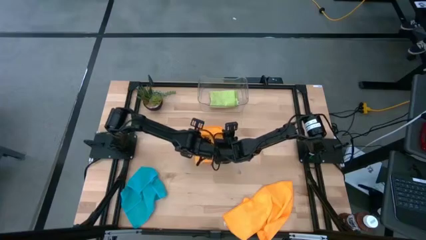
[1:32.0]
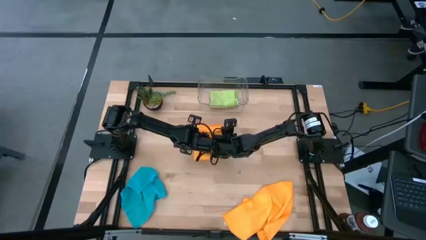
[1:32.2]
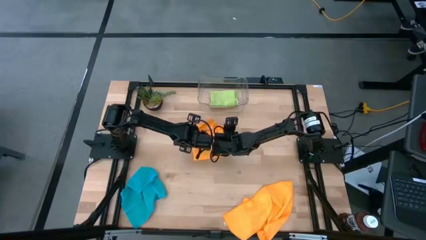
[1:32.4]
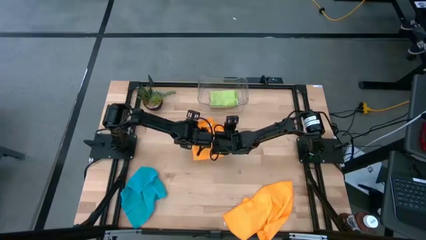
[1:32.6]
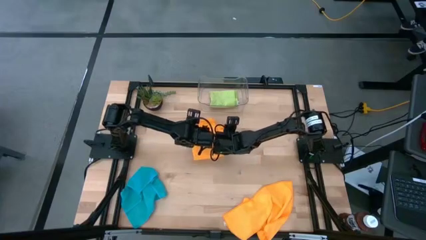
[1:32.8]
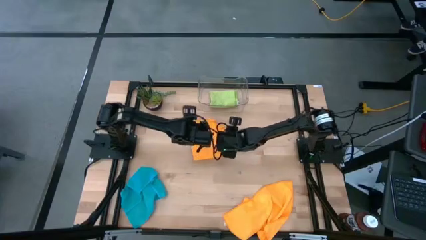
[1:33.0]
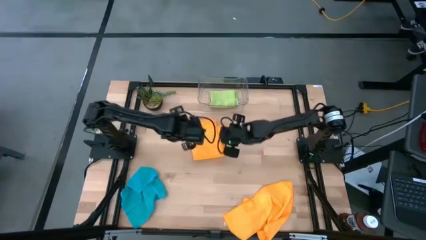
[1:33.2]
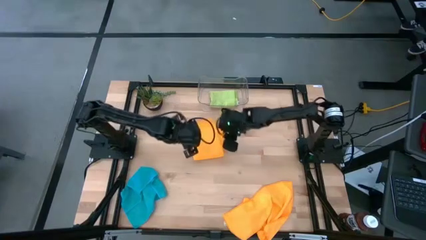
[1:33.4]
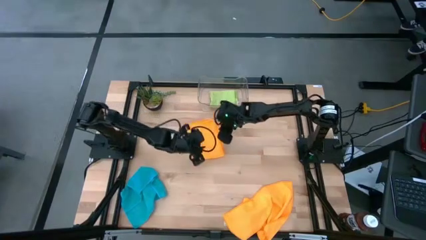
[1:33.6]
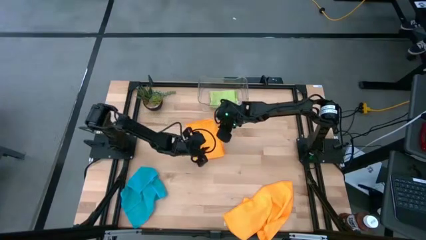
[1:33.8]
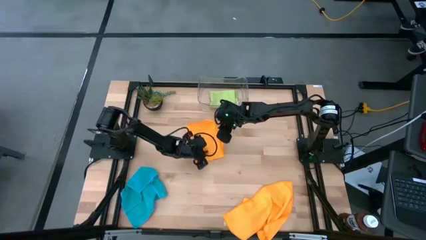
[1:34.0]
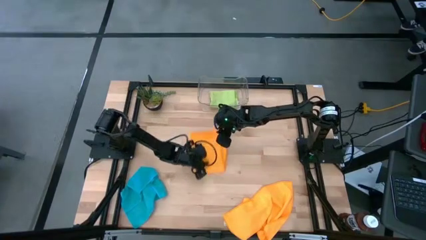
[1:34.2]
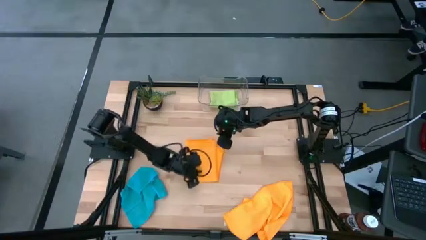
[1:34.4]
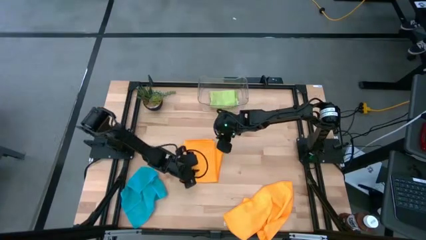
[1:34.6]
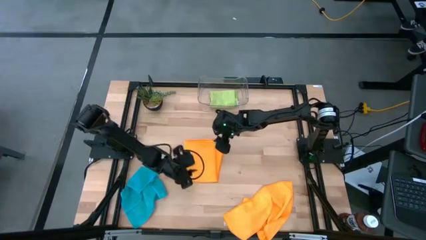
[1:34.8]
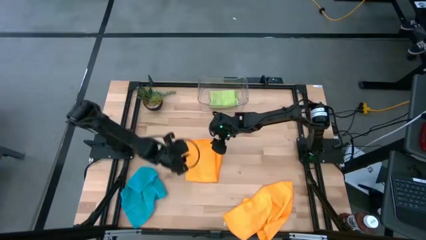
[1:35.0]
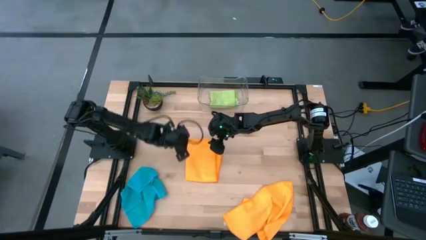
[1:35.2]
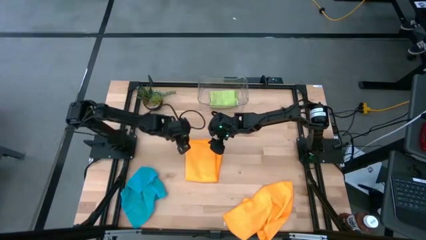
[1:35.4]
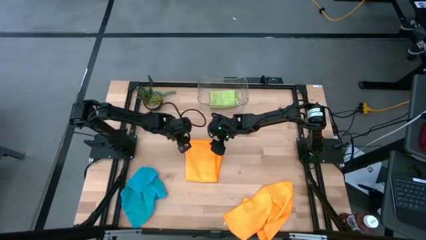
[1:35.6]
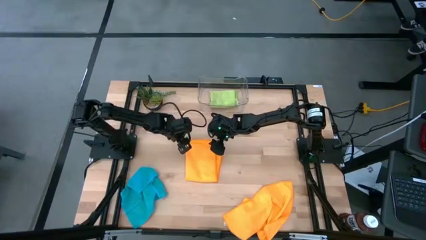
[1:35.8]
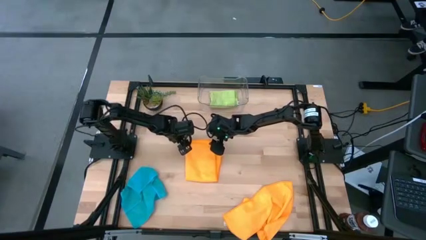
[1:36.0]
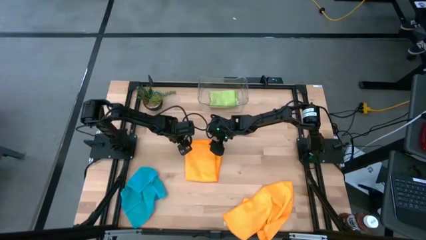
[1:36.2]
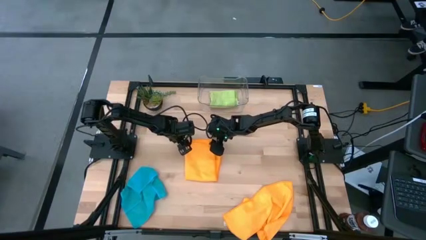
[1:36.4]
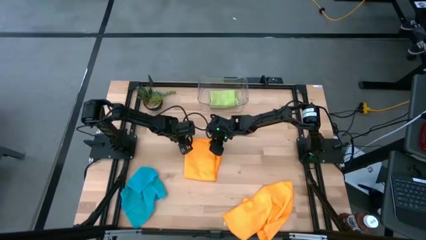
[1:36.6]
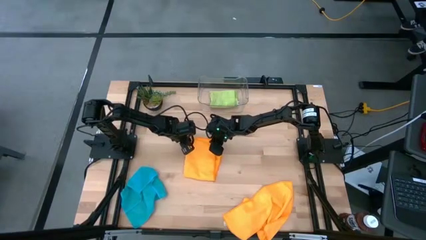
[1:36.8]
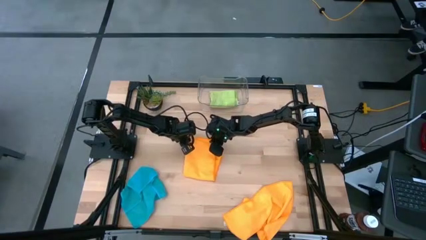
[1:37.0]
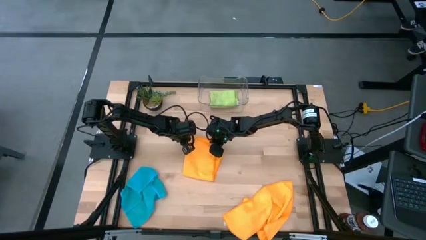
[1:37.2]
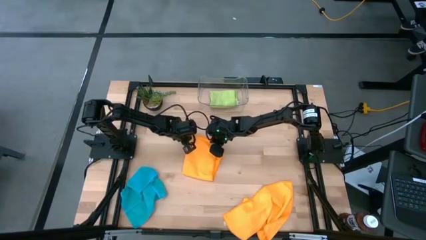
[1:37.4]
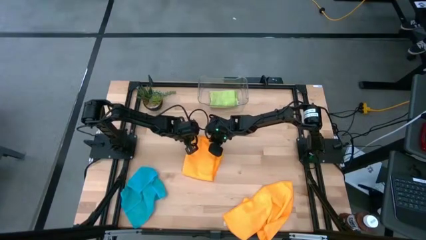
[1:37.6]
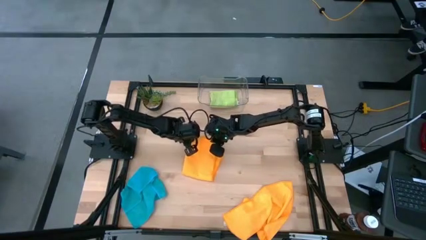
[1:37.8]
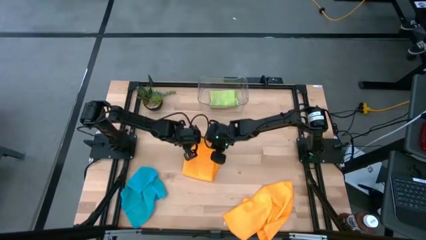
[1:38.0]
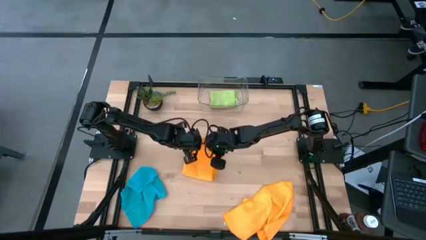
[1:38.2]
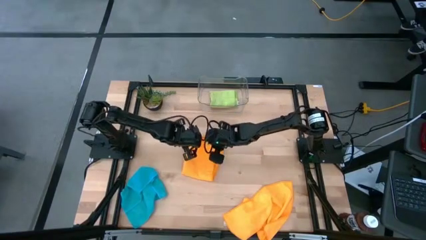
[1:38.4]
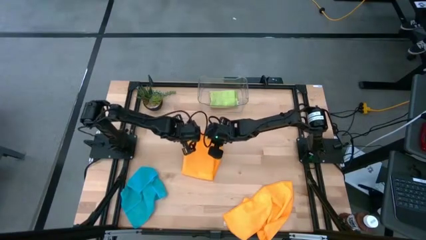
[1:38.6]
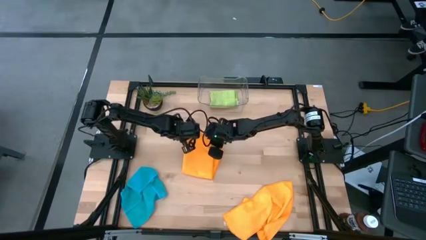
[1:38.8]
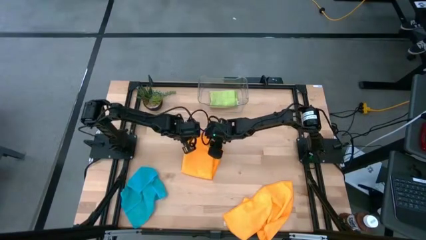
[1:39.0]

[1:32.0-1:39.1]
Task: Fold microfiber towels
Fold the top orange microfiber cloth

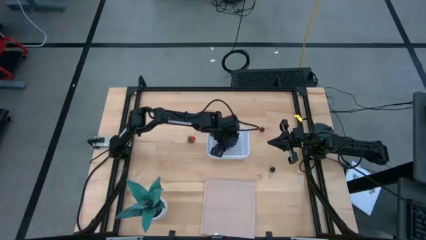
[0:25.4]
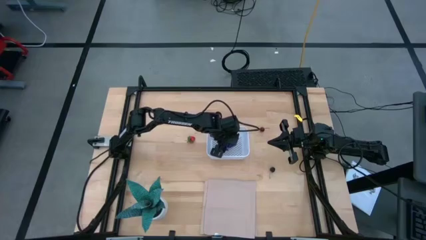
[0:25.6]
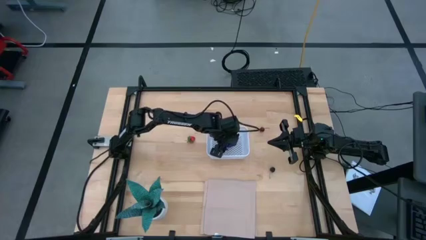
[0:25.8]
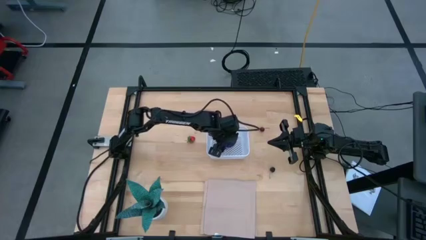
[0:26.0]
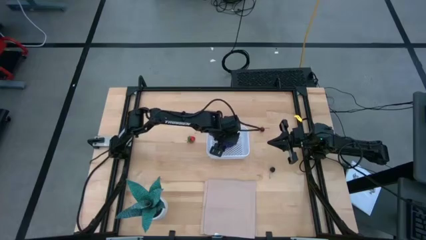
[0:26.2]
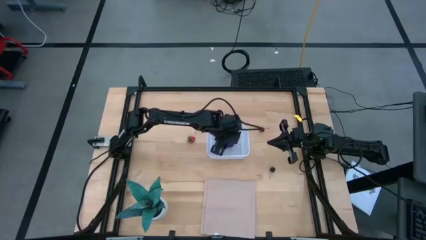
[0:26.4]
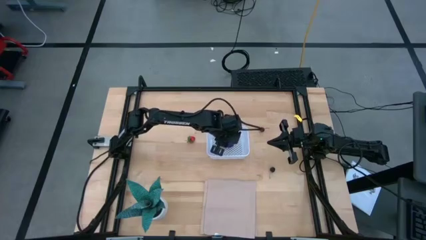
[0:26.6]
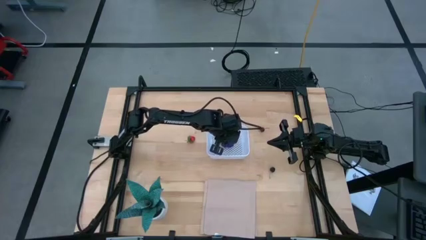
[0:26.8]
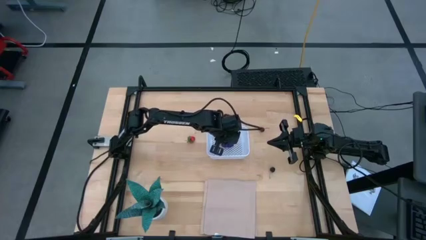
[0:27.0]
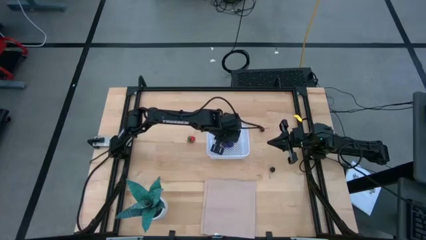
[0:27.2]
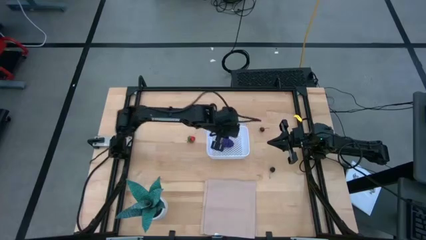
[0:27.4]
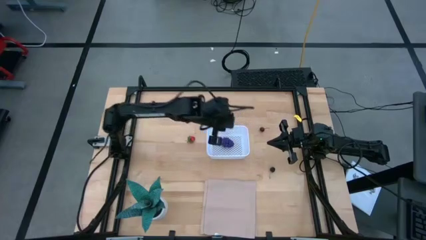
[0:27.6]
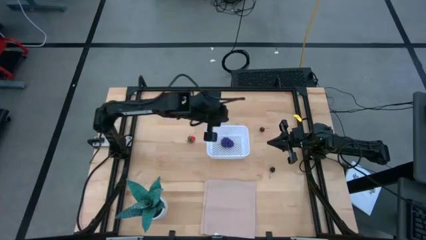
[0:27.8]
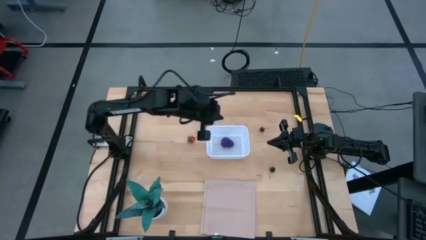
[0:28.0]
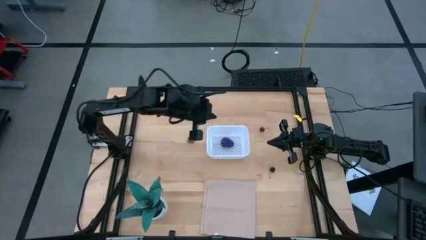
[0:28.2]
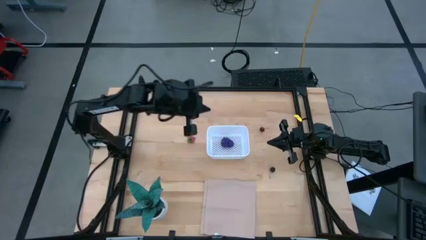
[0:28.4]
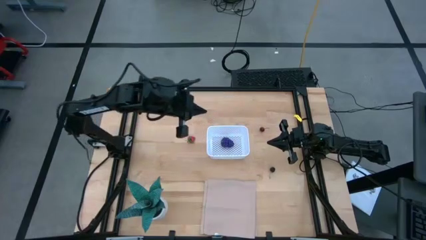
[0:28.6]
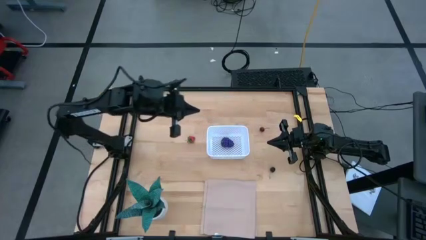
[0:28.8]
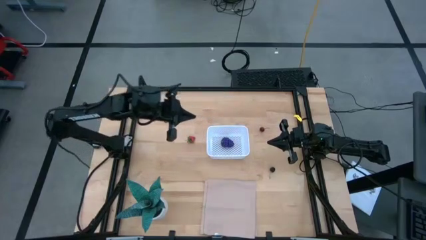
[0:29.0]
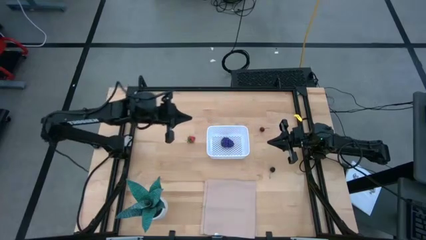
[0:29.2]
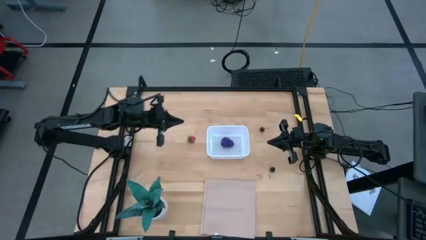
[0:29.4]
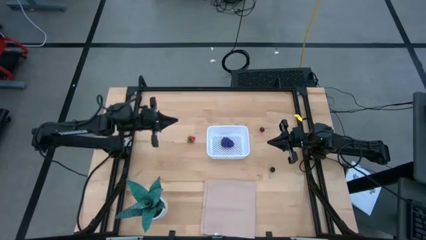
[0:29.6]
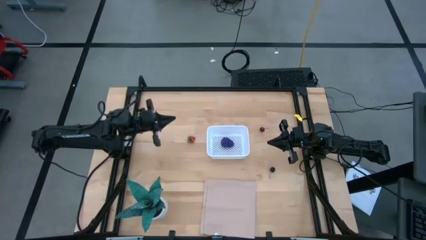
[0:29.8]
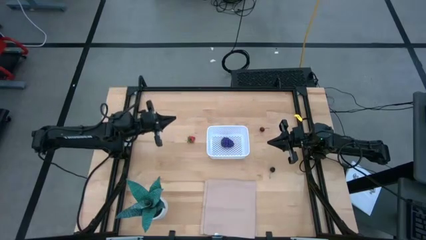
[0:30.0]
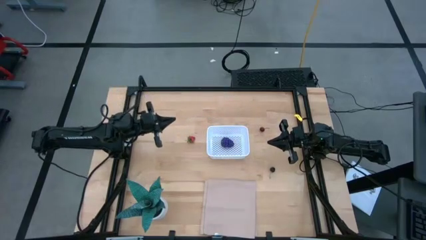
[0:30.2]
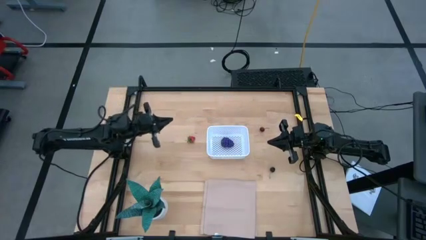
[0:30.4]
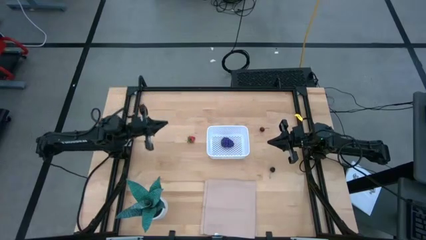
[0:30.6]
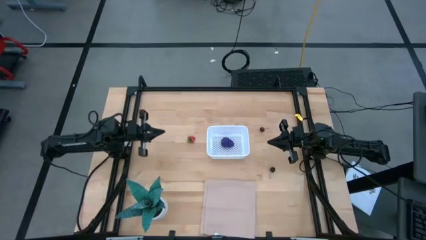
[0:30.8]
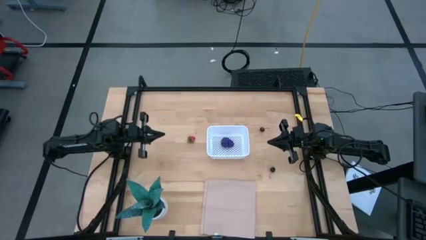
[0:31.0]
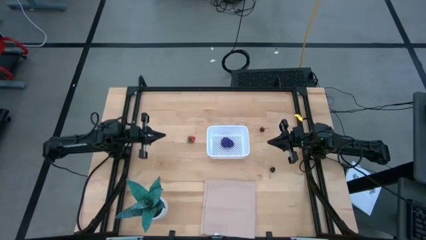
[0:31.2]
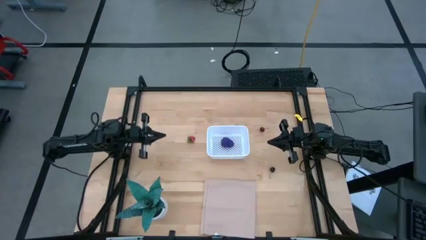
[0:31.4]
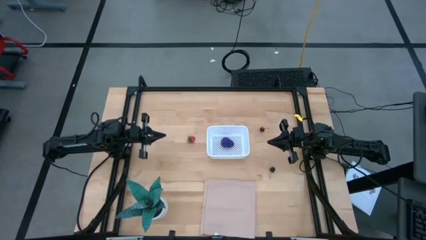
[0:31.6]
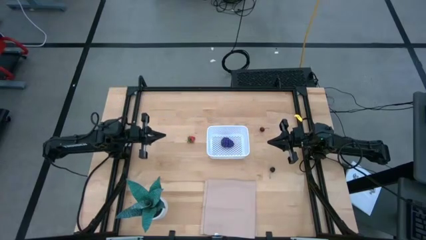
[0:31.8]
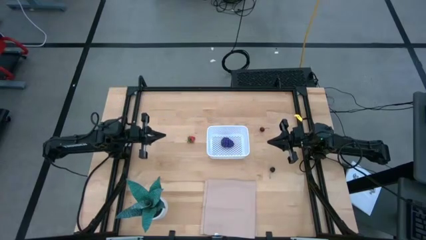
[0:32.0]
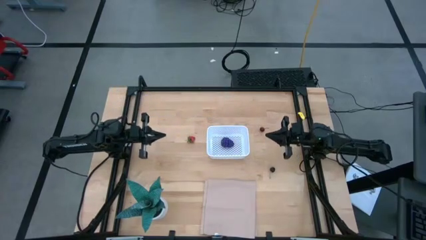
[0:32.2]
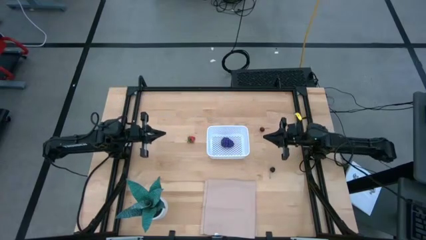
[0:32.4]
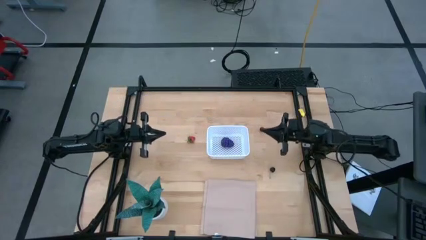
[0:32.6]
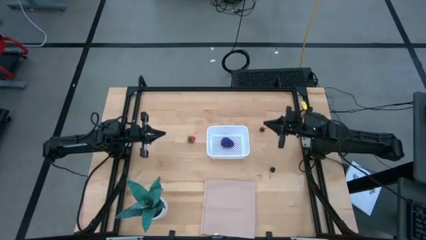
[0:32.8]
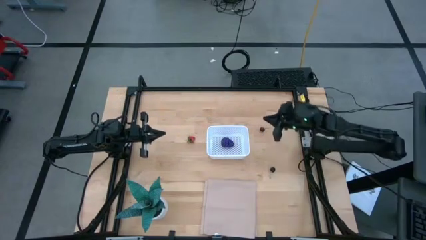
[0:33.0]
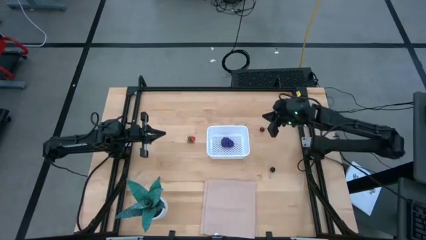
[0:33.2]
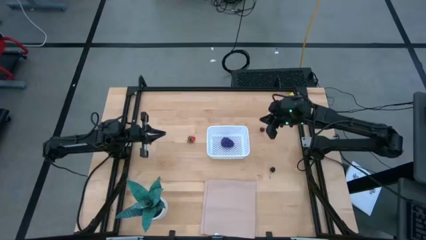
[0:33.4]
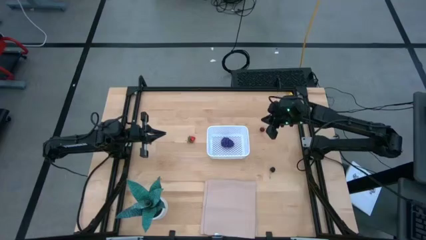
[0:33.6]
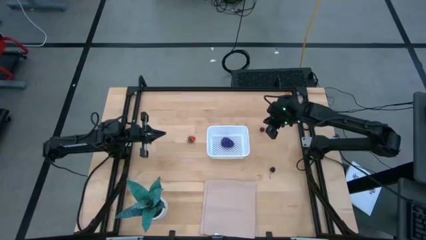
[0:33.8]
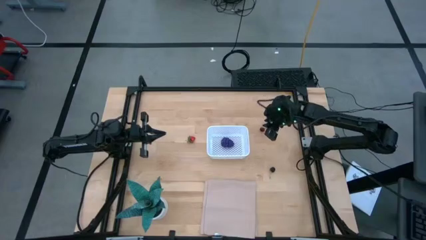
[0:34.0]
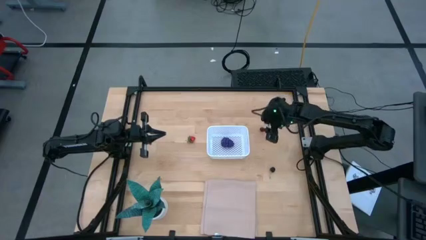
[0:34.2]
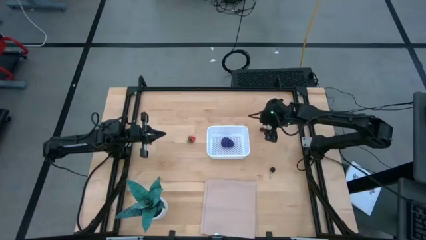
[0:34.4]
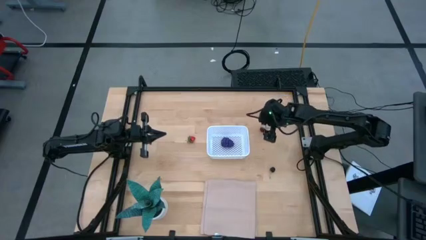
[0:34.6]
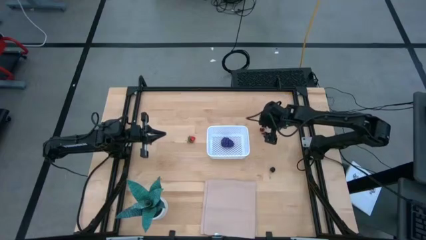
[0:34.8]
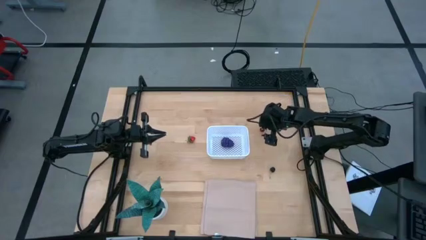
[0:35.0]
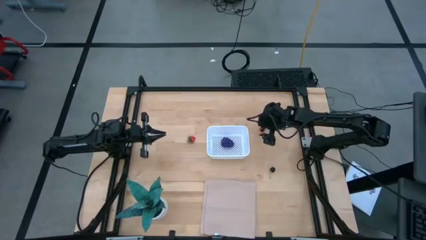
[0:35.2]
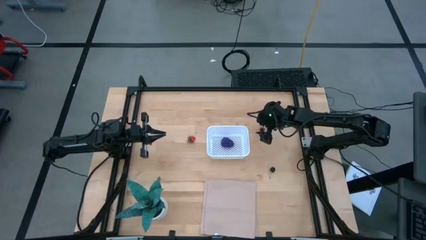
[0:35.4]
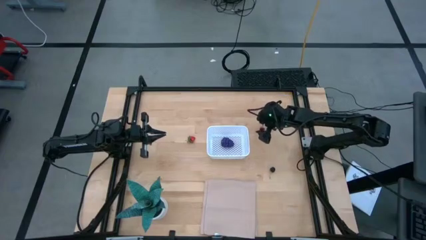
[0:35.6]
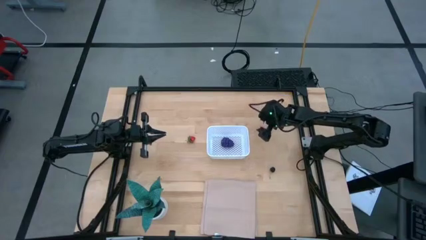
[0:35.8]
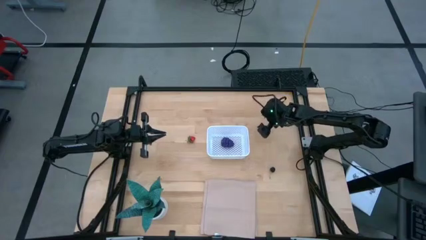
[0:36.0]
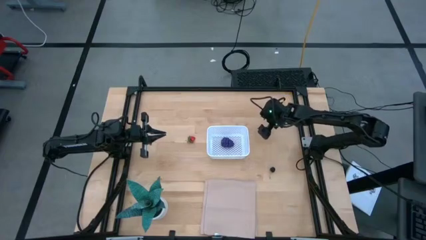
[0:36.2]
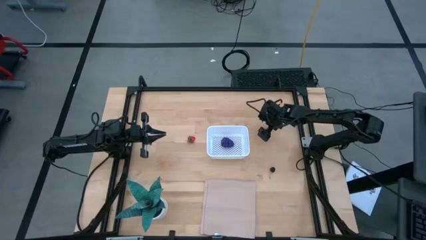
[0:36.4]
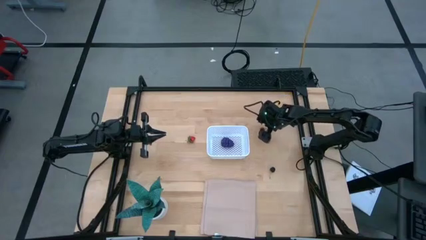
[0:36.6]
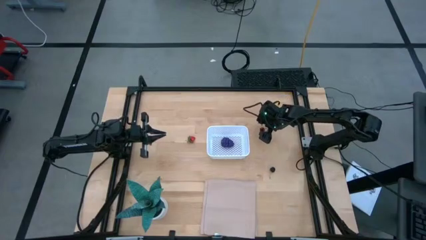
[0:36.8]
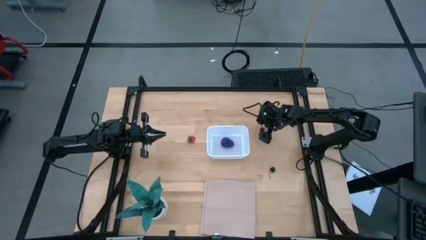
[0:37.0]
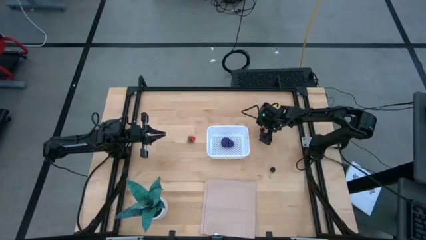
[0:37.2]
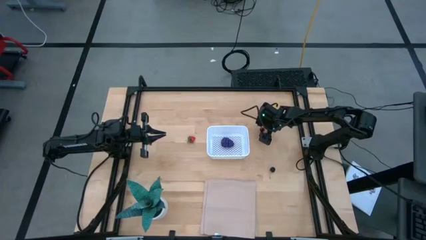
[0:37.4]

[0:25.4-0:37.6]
Task: Pick and placing Produce into tupperware
Put the red cherry into the white bin
